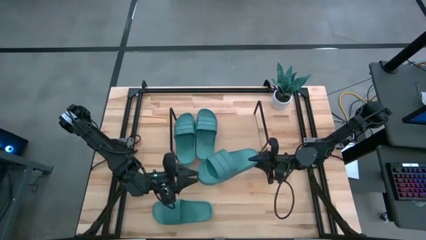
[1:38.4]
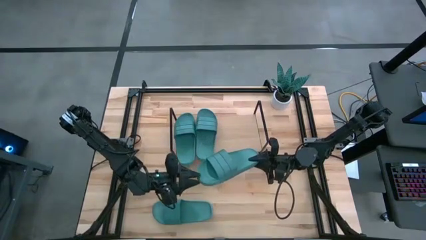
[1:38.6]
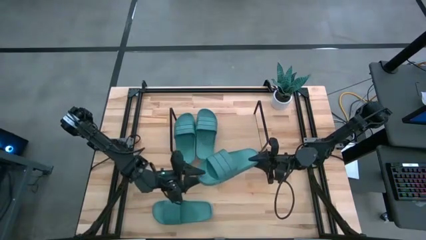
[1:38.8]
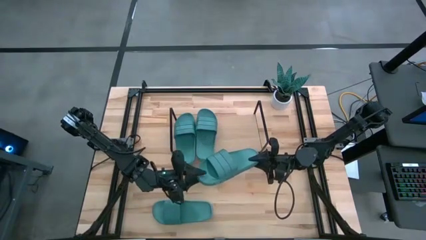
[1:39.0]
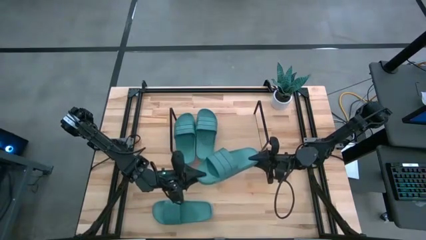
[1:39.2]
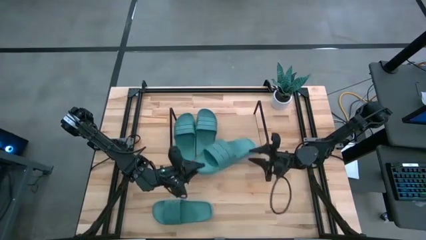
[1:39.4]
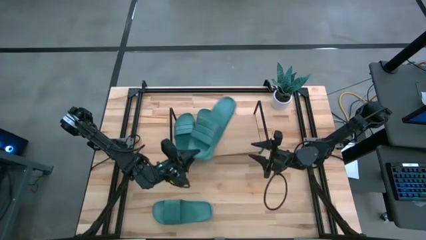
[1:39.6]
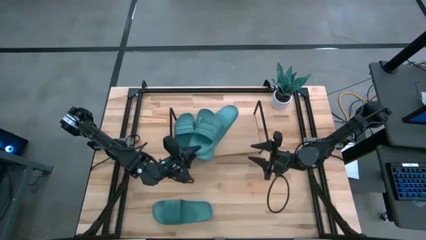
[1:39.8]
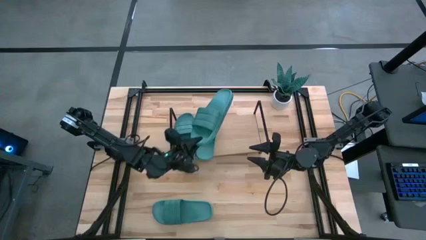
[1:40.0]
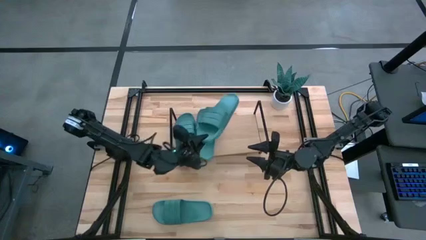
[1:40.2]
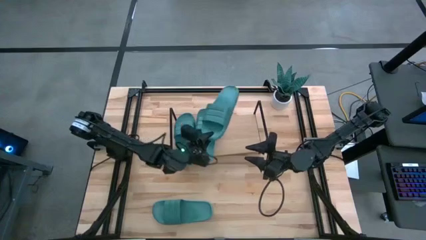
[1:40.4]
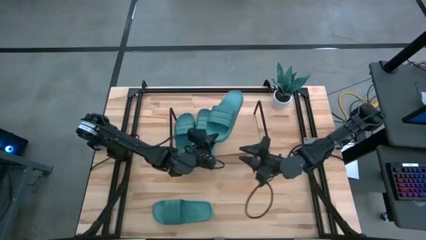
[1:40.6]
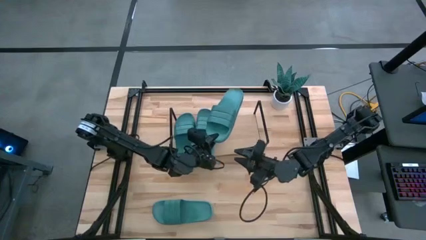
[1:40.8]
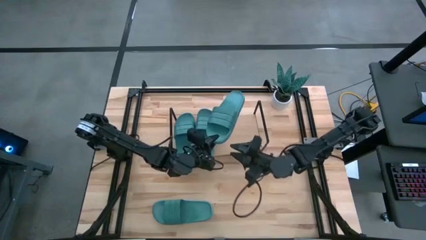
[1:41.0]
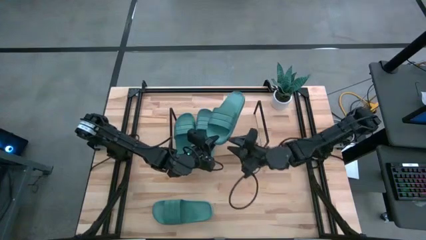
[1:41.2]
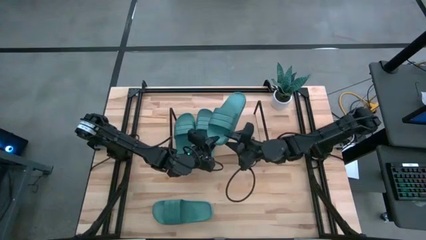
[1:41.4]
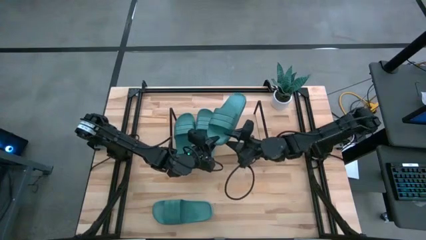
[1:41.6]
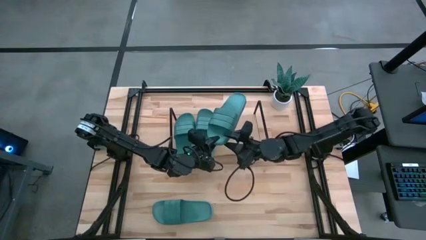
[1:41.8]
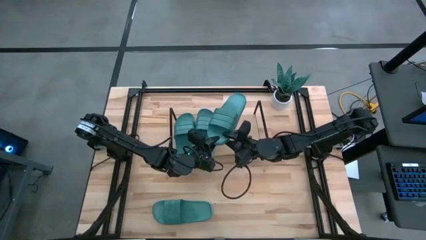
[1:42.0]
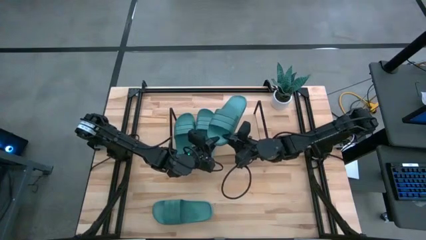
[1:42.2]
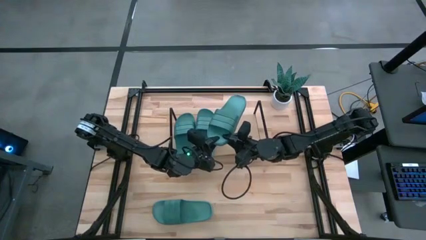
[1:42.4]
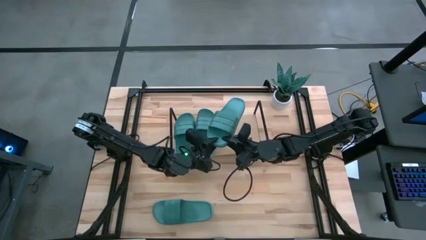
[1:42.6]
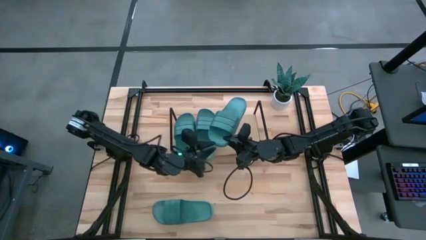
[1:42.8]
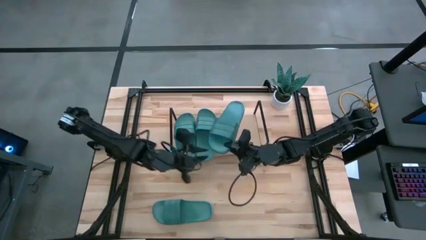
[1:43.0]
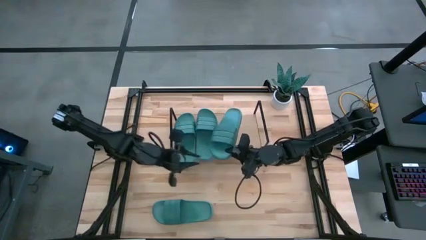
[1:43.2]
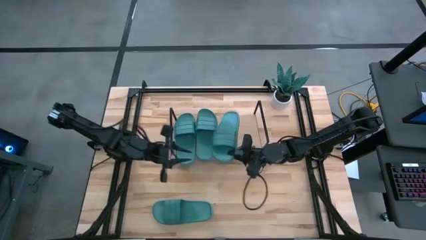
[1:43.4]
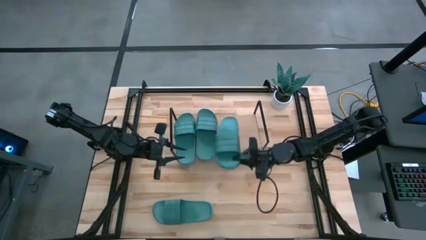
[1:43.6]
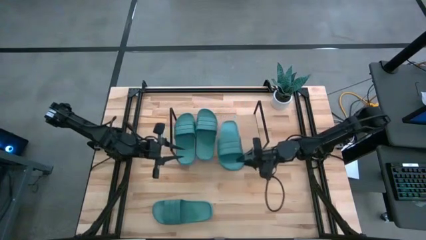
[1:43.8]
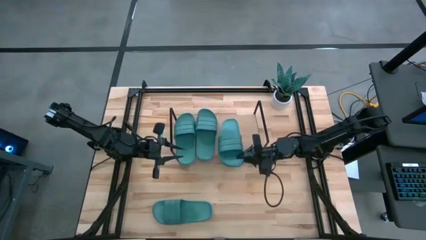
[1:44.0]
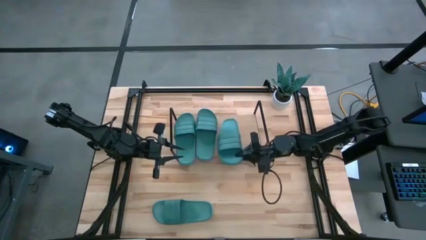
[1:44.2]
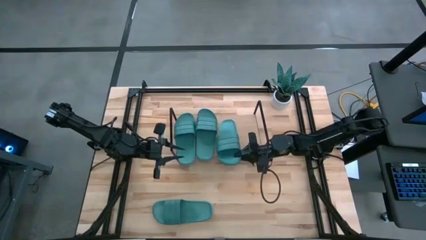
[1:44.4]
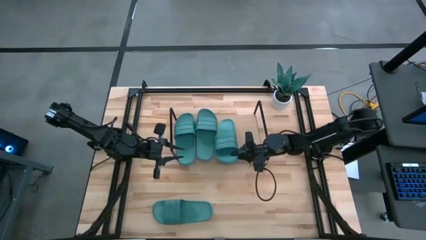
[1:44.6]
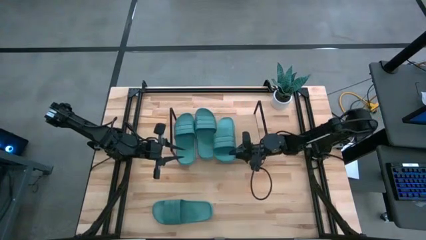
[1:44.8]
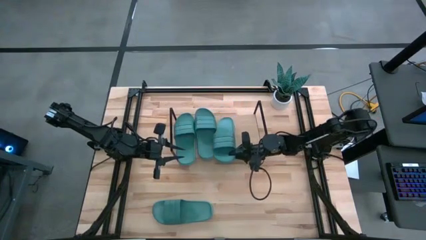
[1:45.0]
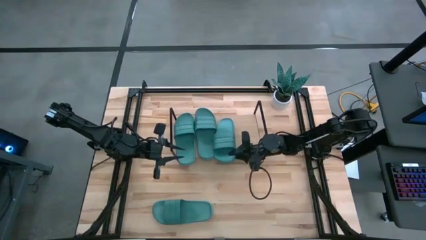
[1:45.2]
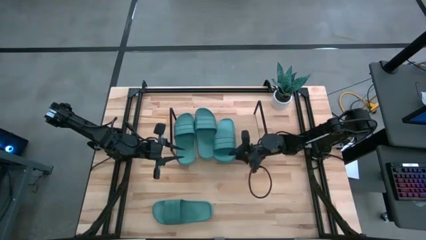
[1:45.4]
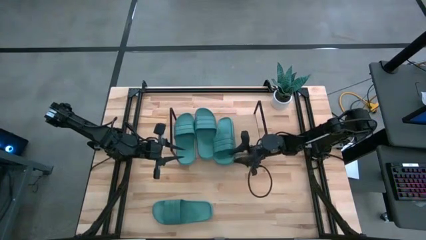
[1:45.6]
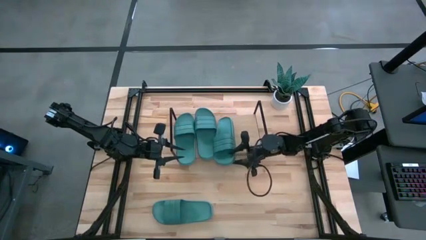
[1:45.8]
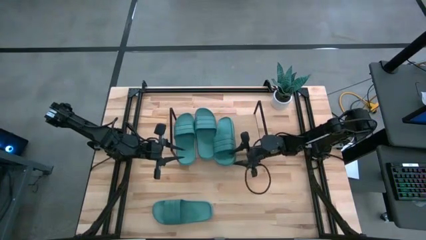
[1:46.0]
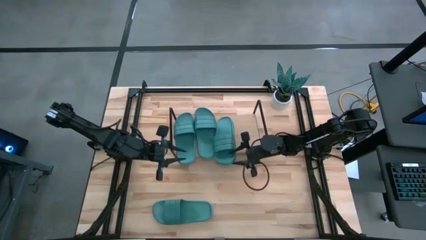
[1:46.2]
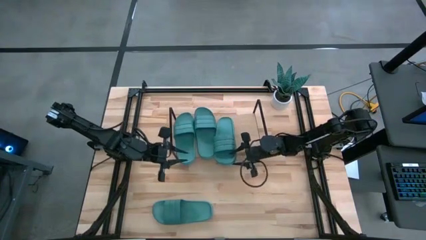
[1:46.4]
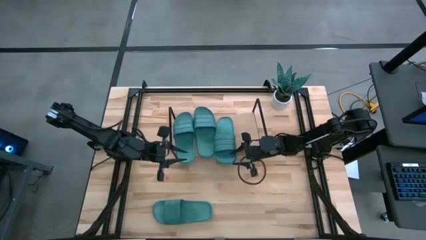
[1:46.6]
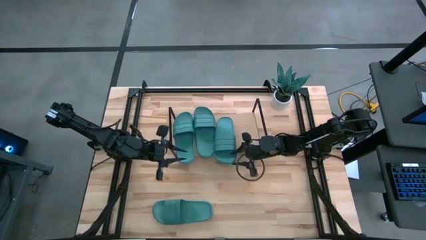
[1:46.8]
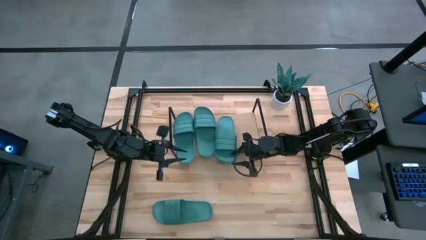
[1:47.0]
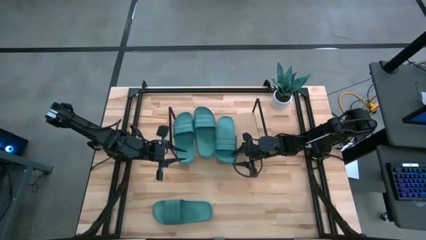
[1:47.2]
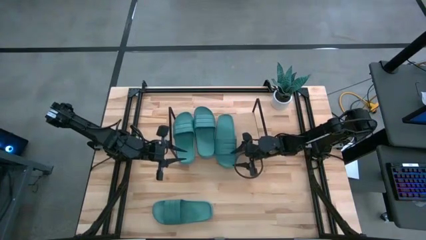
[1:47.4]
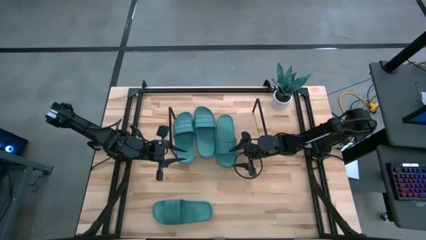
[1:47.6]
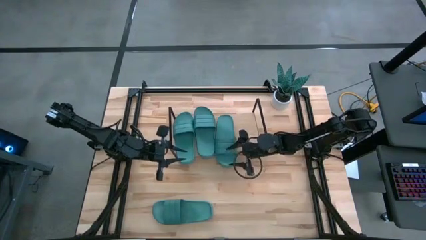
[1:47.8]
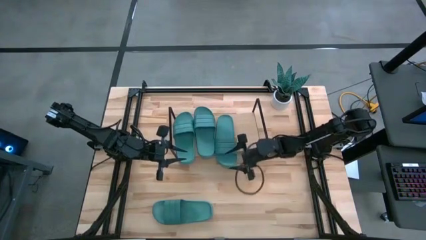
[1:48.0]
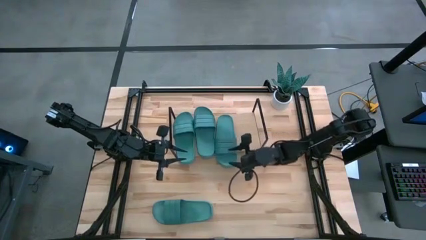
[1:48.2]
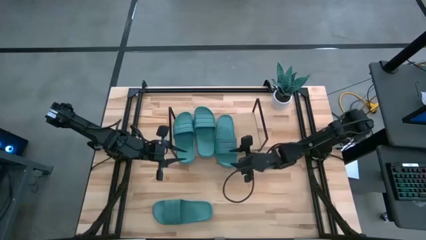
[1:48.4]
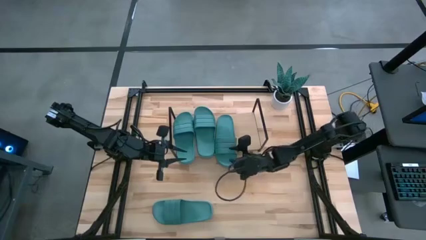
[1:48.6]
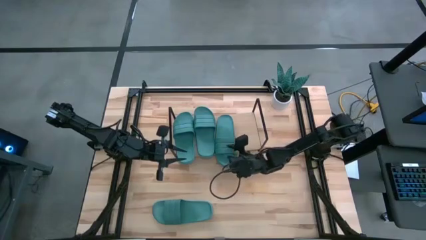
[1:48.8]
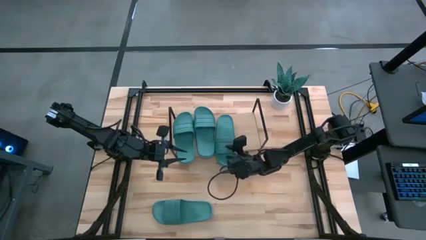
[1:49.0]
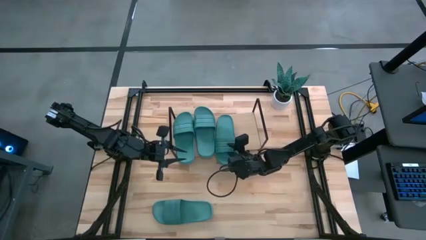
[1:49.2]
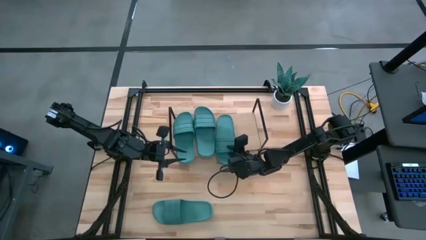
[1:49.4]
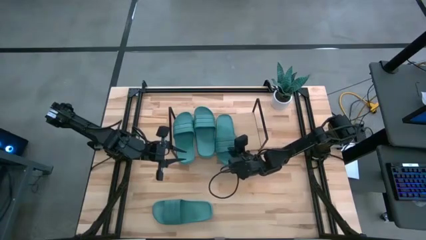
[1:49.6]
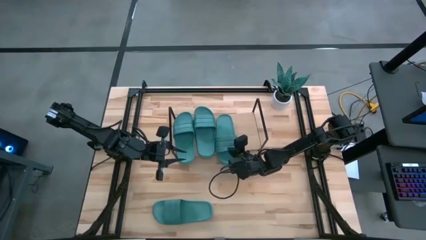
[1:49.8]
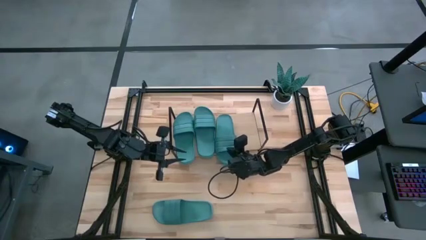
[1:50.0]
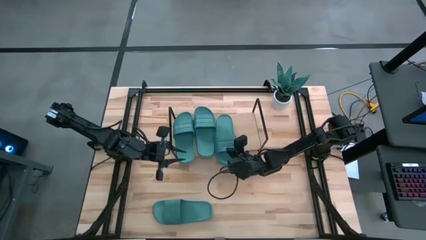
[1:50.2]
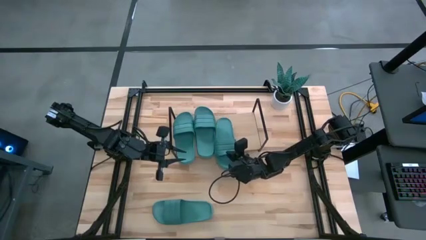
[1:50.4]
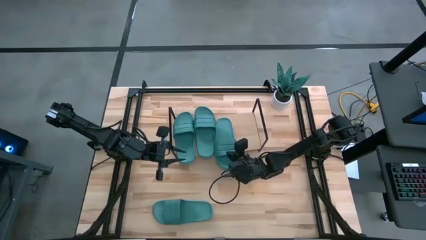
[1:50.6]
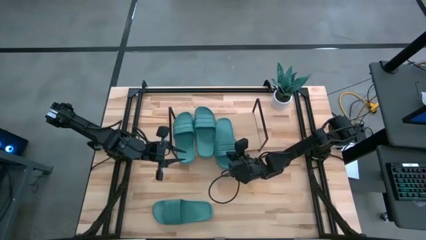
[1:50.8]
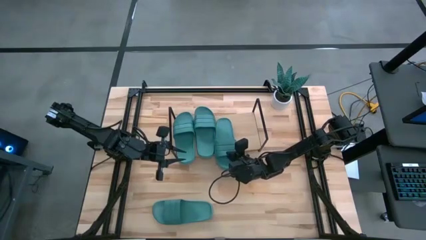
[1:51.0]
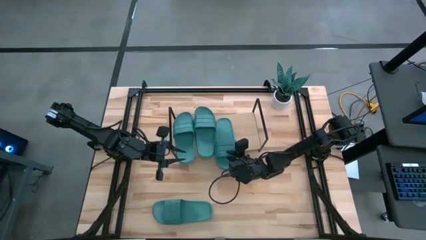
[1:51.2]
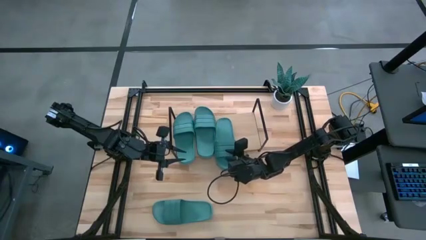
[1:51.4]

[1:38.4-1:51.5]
Task: Pick and place slides into the shelf
Put the green slipper on the shelf

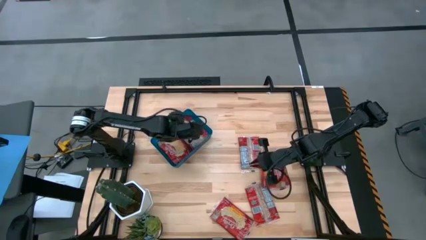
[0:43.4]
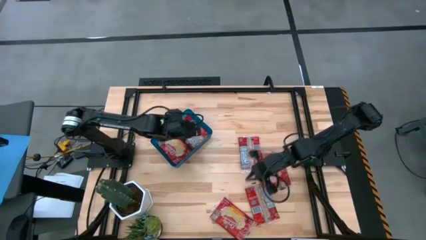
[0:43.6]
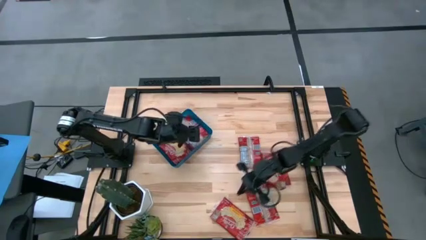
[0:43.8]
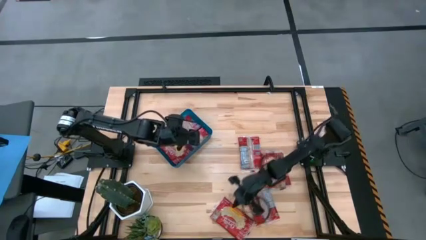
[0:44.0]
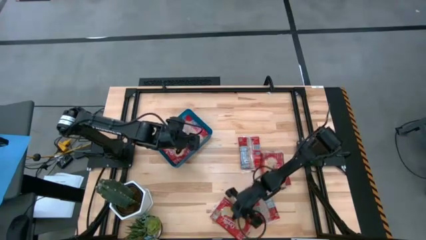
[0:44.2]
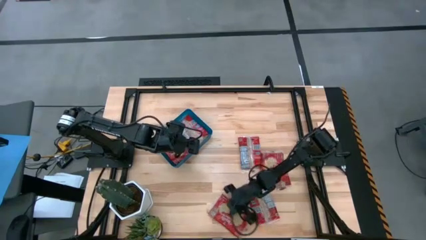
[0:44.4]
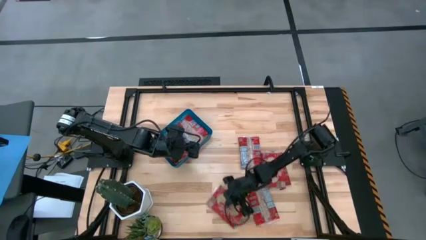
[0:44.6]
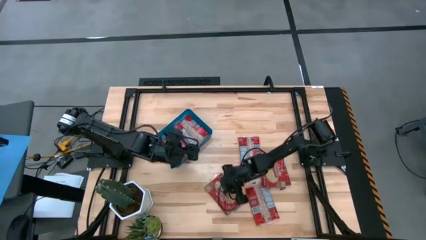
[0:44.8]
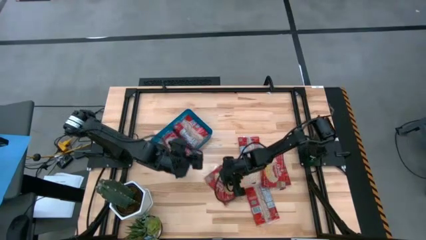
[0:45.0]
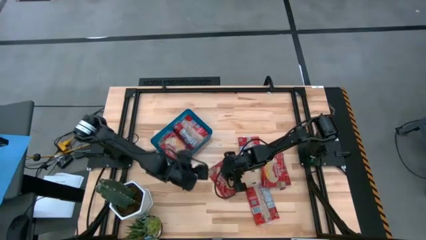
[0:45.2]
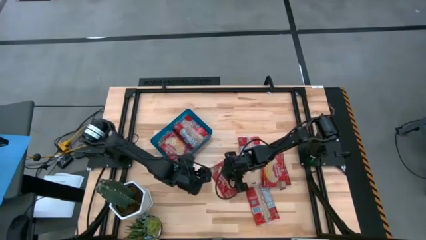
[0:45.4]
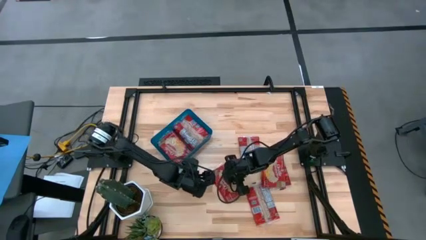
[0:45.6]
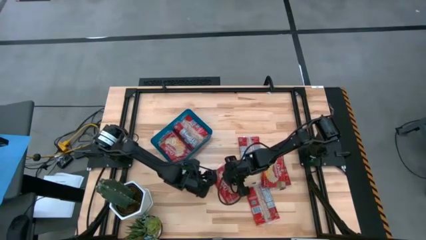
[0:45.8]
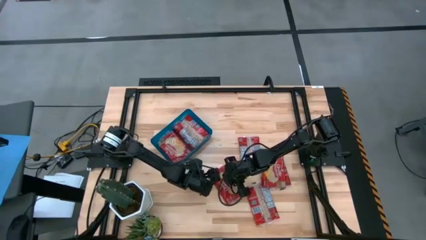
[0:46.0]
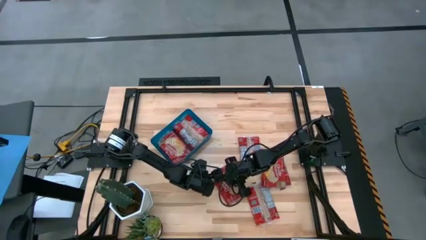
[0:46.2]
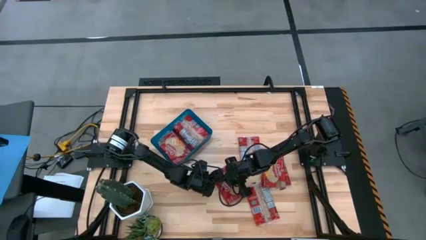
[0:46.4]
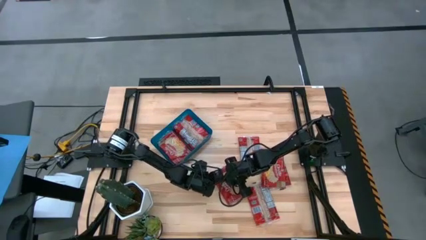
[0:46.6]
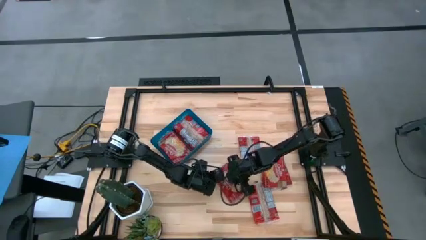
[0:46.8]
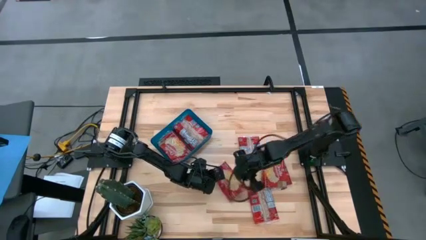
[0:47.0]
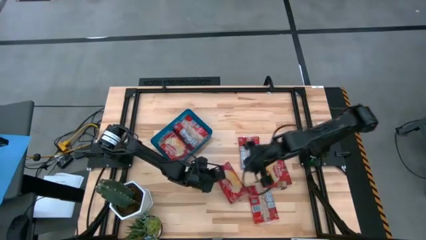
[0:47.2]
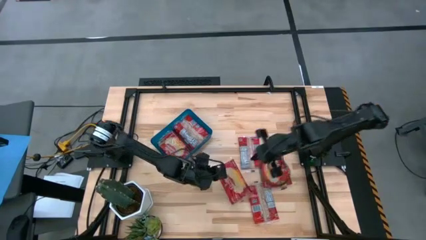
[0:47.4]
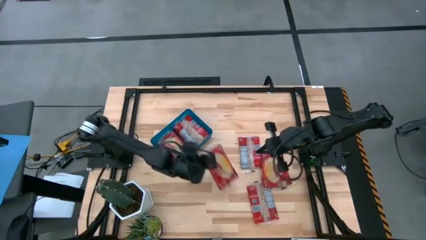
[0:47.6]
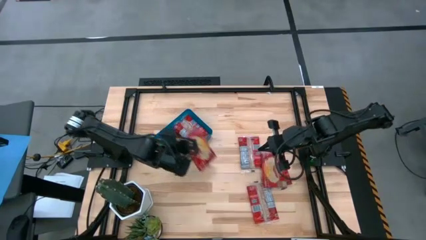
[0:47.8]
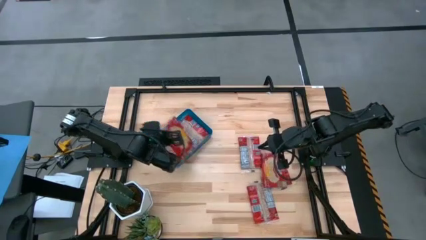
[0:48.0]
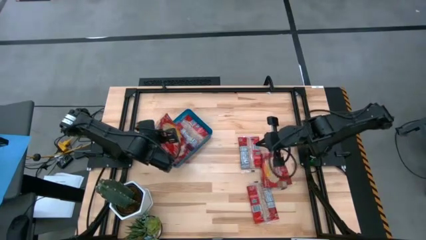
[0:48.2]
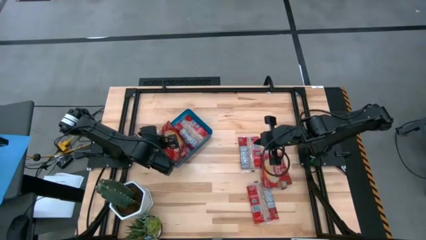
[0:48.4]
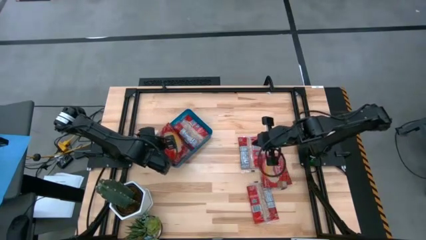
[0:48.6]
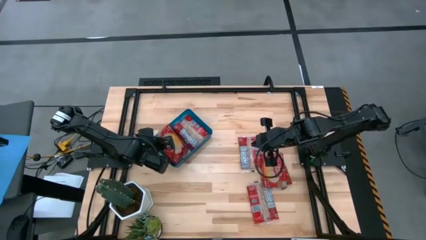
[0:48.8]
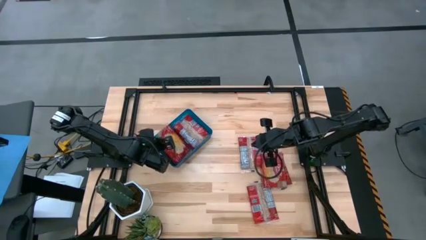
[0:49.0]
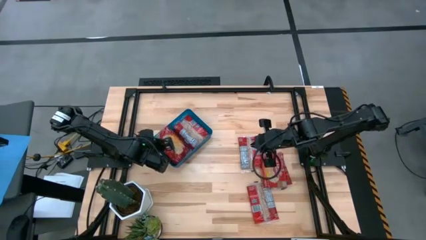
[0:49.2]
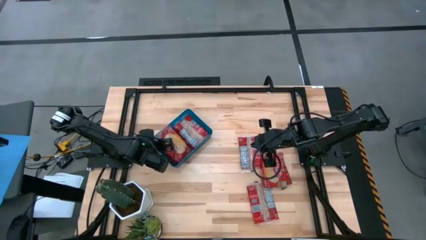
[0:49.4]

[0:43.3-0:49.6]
Task: Sort popcorn bags into baskets
Put the red popcorn bag into the blue bin
